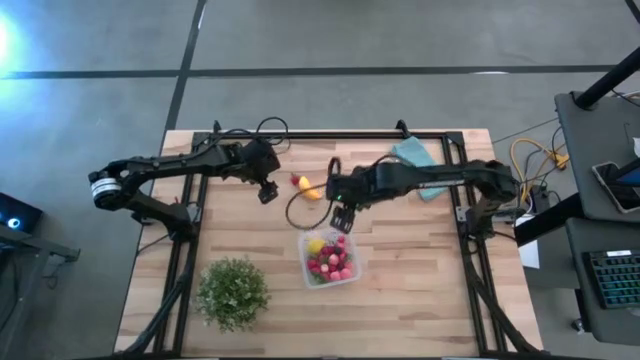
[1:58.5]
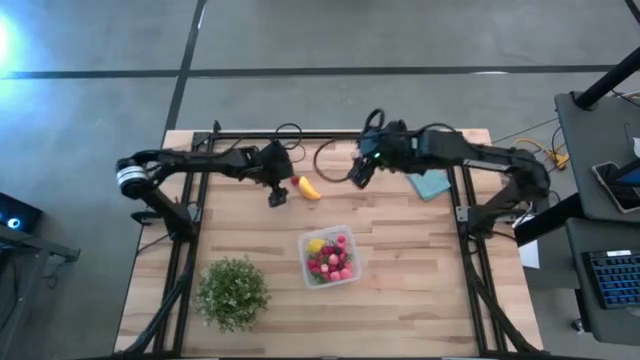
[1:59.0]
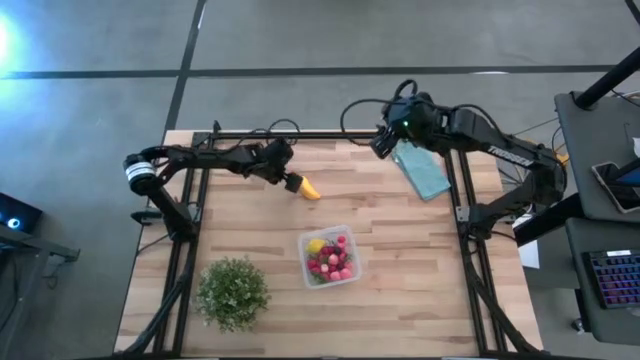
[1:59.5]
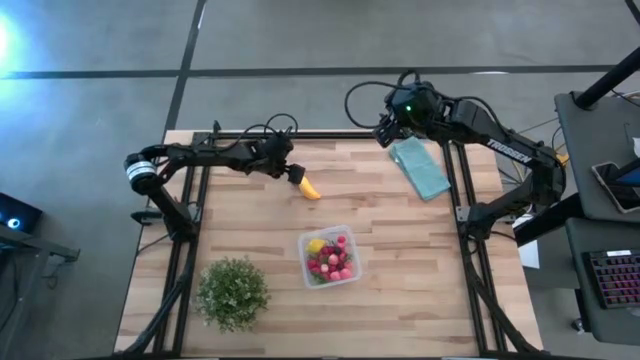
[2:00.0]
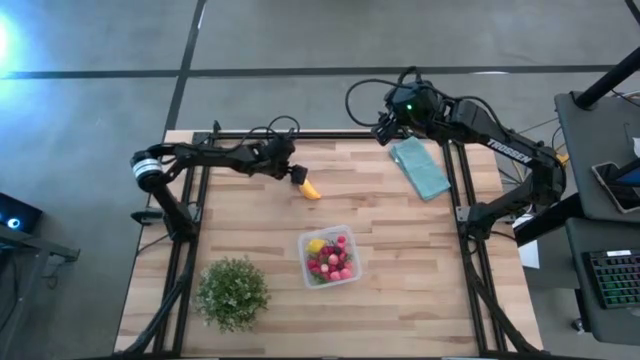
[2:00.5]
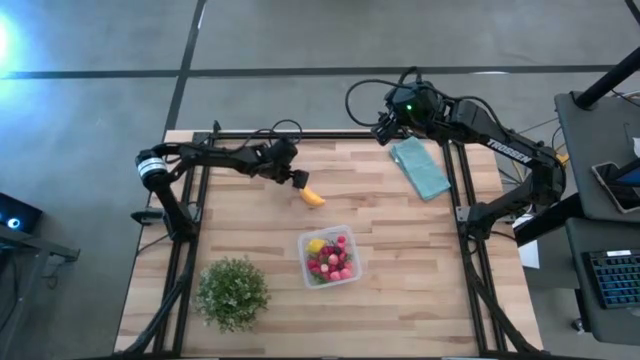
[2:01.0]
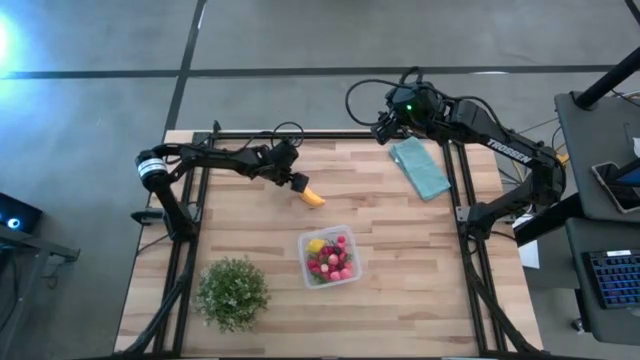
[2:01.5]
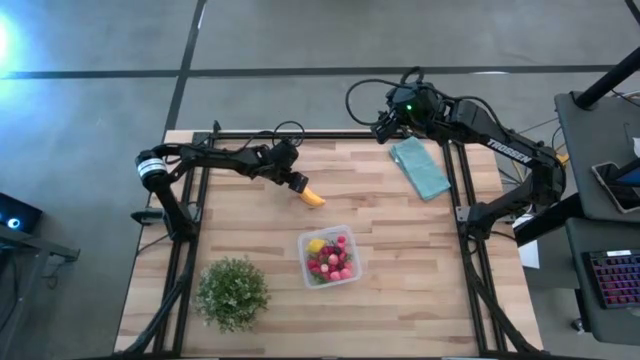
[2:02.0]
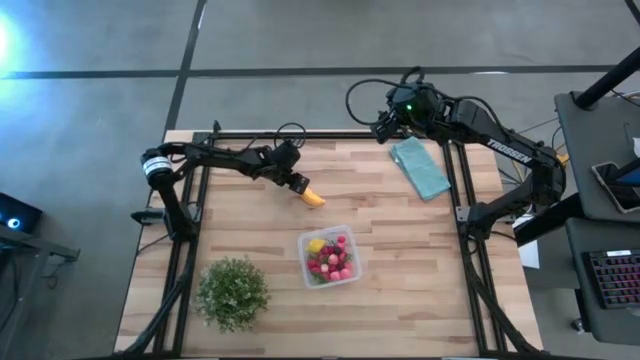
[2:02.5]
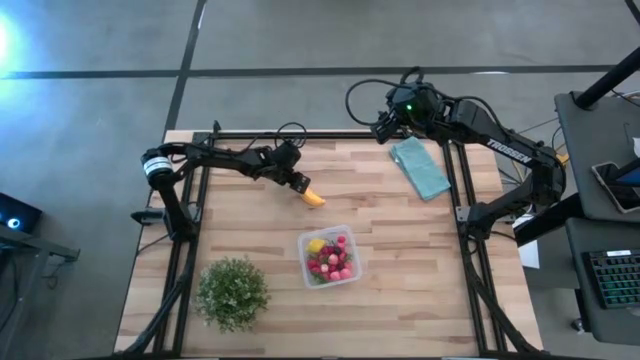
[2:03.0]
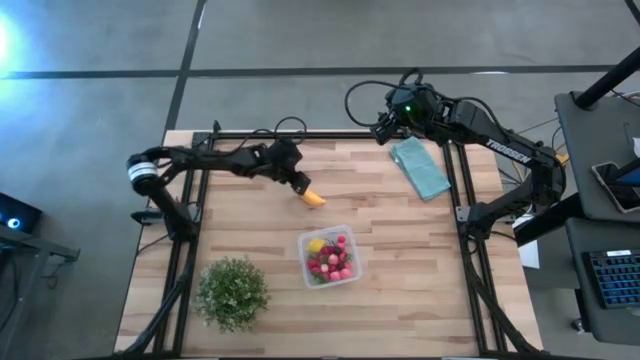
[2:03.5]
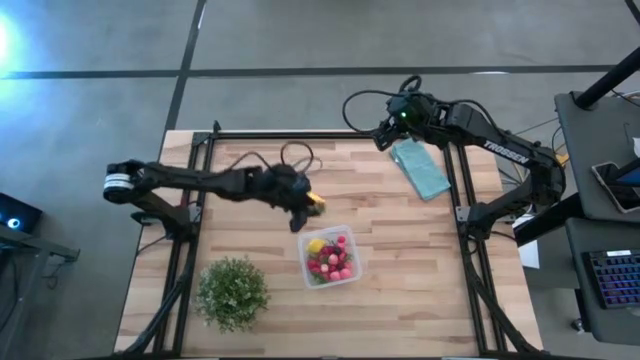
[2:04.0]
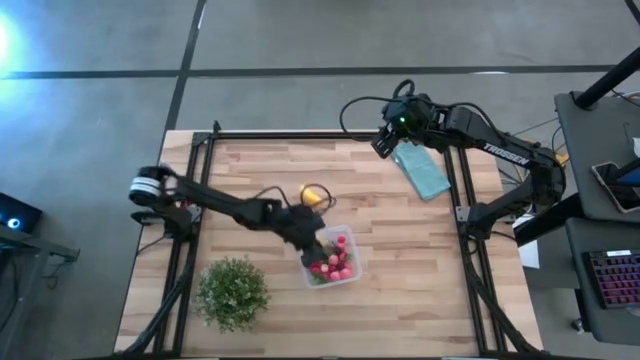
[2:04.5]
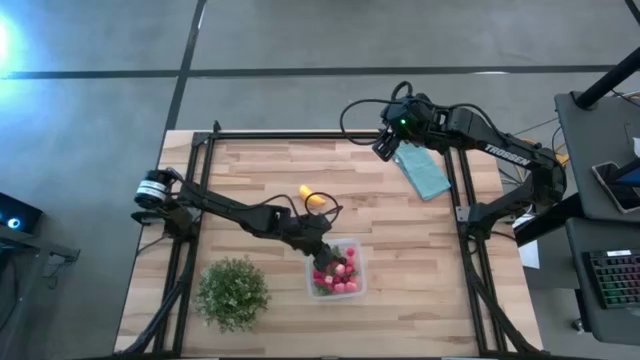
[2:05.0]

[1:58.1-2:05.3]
Task: Pick and placing Produce into tupperware
Put the strawberry into the transparent bin

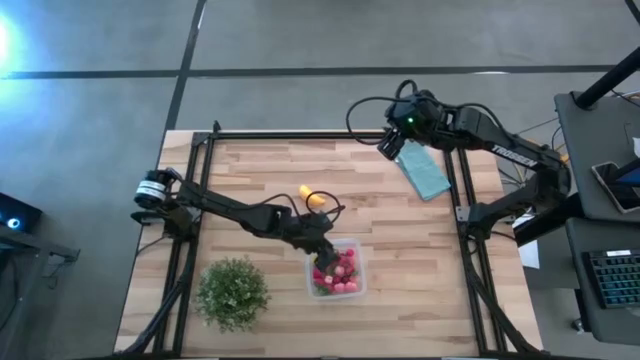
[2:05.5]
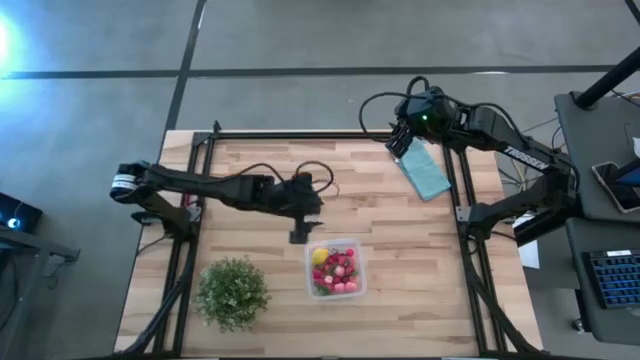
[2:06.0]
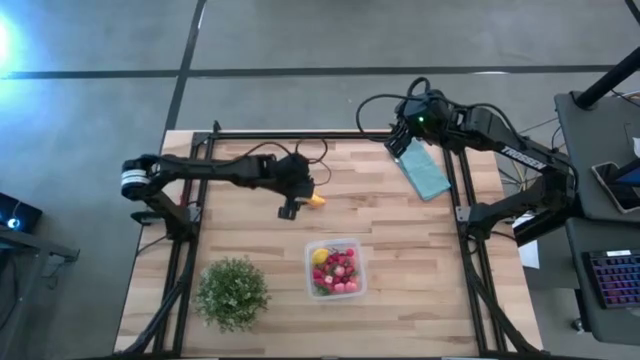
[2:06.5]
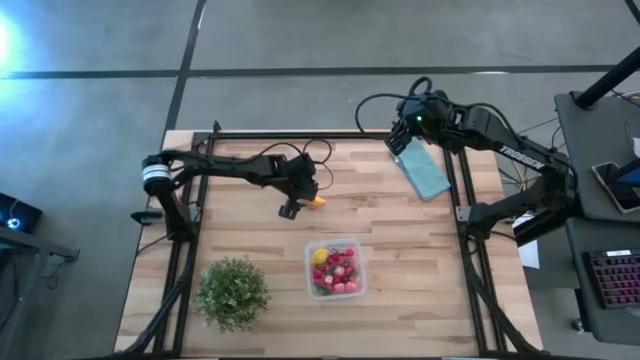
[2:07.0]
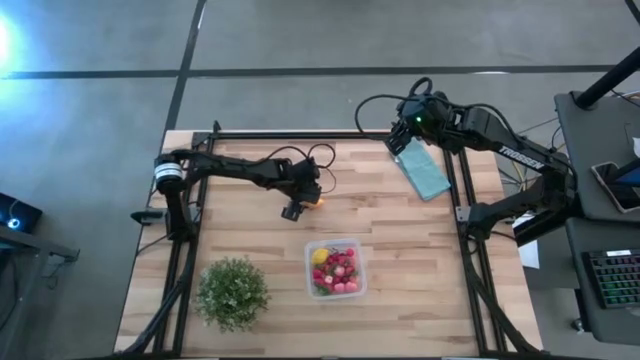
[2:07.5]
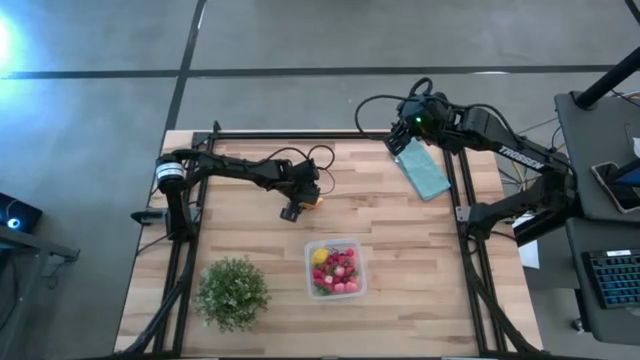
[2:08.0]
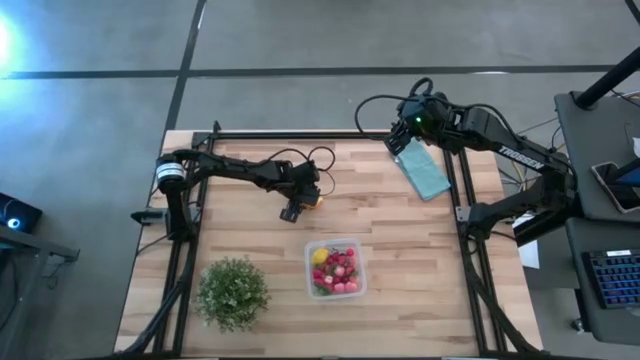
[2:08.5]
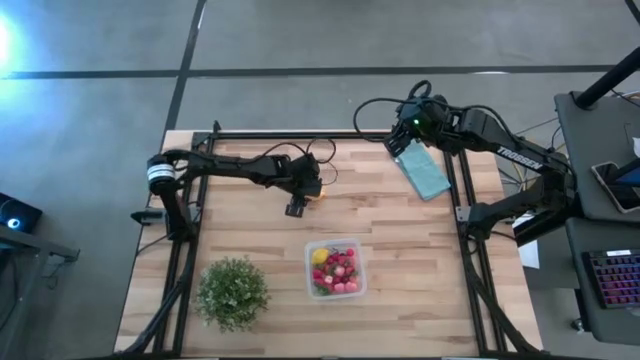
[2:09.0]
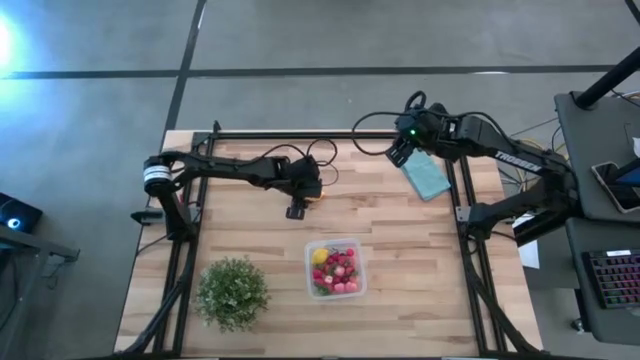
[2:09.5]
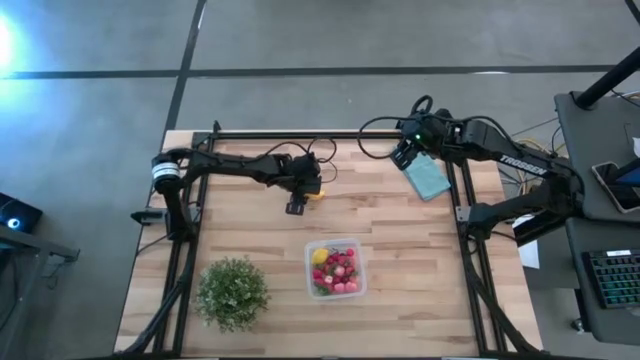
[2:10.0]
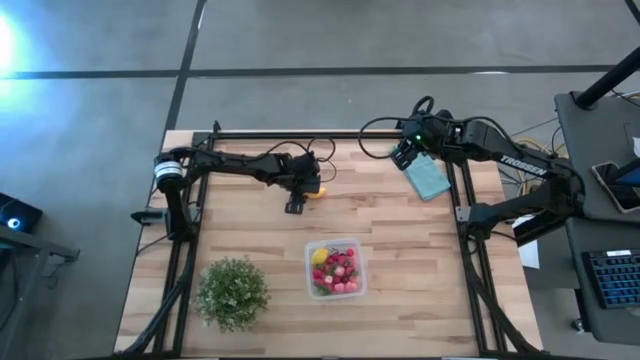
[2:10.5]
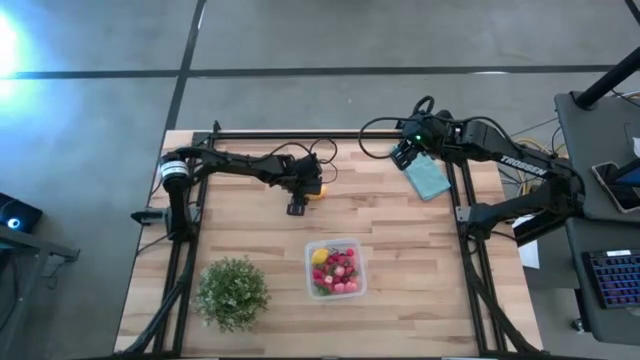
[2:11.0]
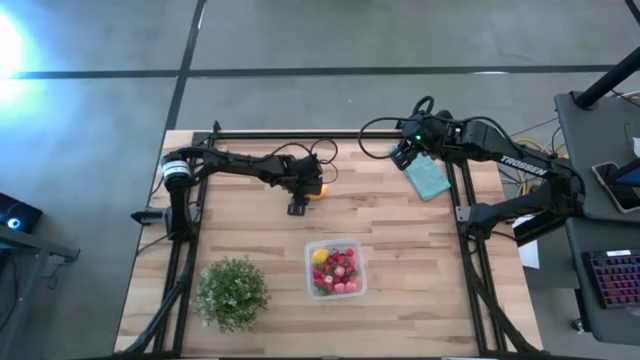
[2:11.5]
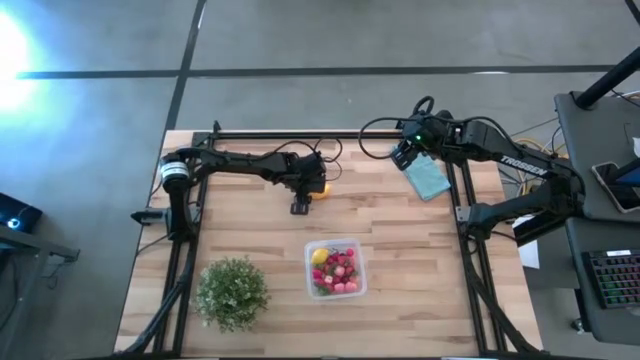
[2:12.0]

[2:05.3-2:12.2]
Put the banana into the transparent bin

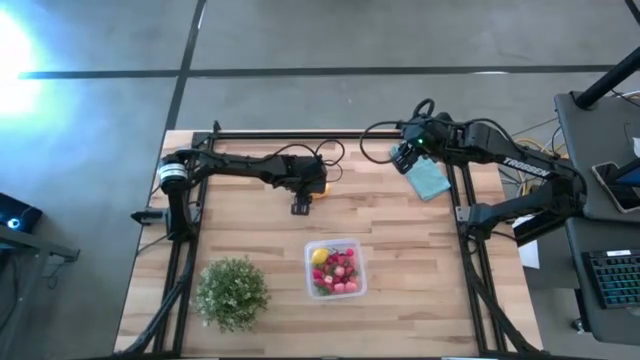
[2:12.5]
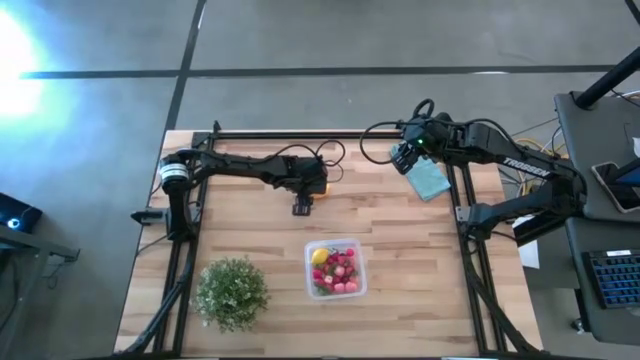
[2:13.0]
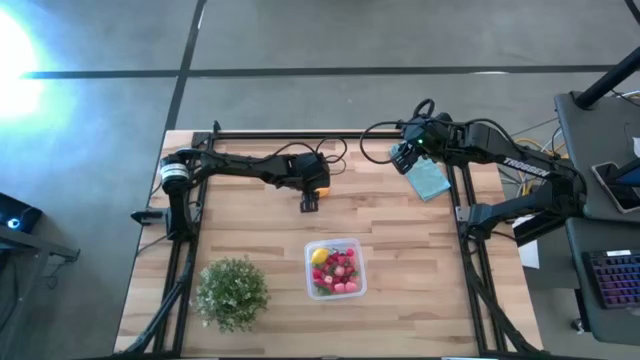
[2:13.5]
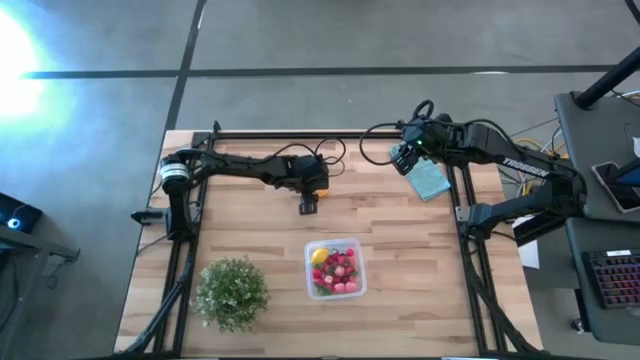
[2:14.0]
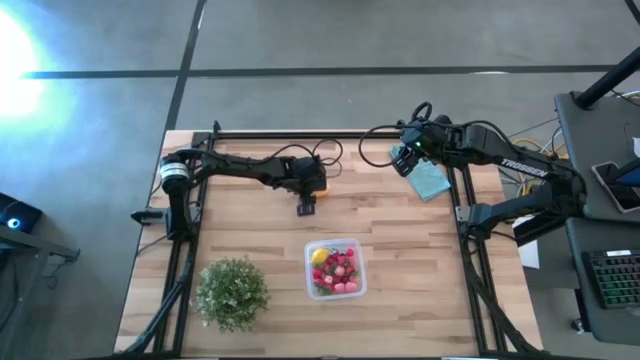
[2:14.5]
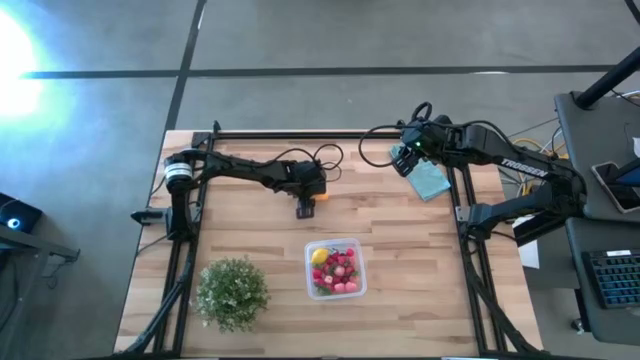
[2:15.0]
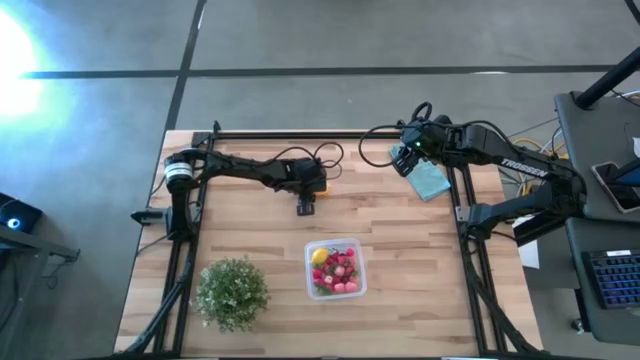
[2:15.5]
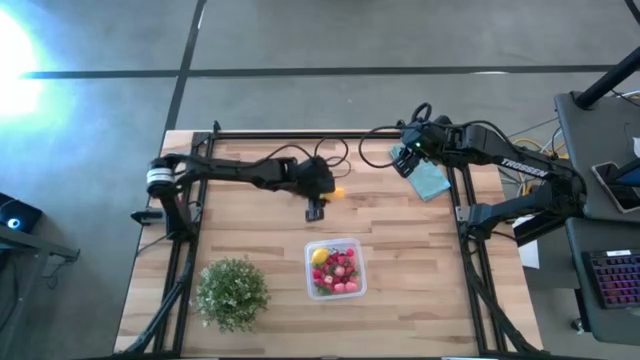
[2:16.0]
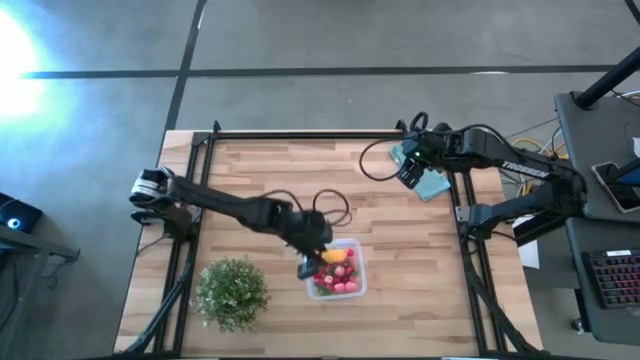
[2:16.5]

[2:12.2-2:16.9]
Put the banana into the transparent bin

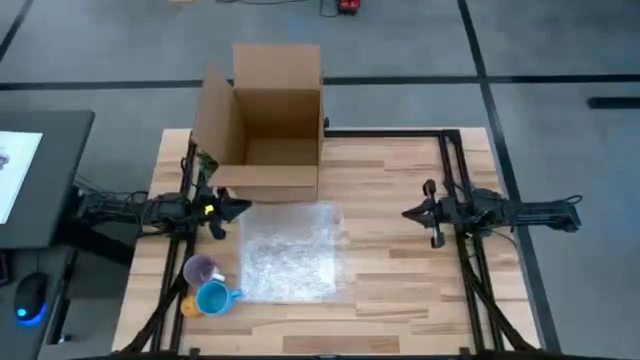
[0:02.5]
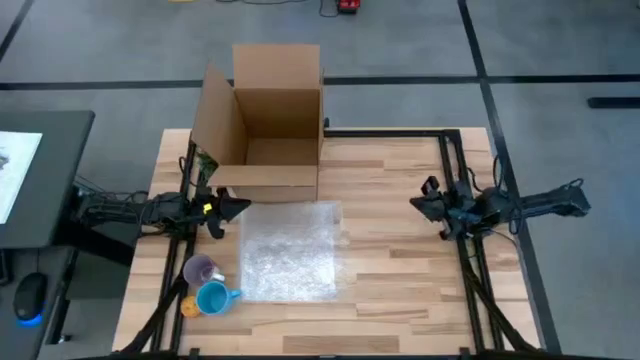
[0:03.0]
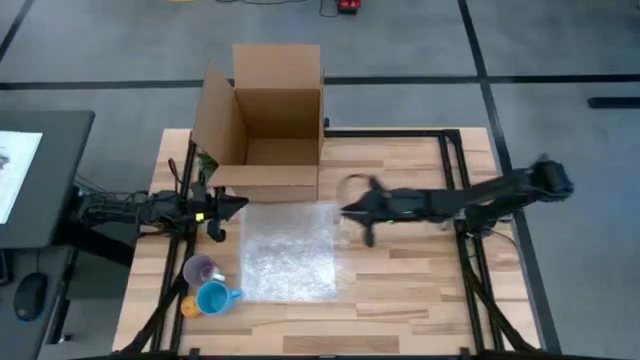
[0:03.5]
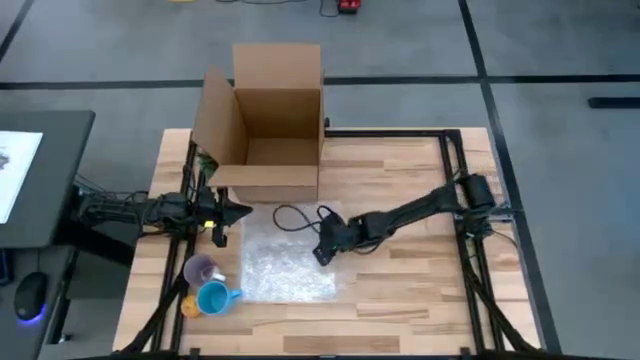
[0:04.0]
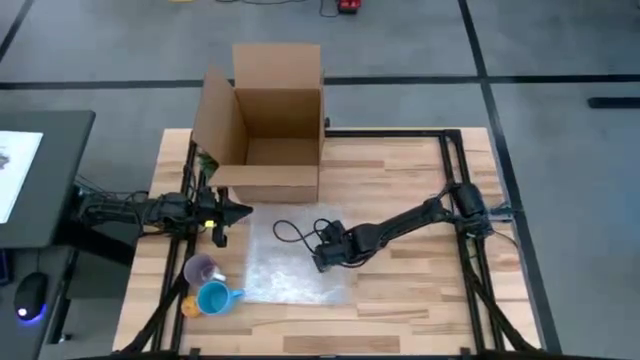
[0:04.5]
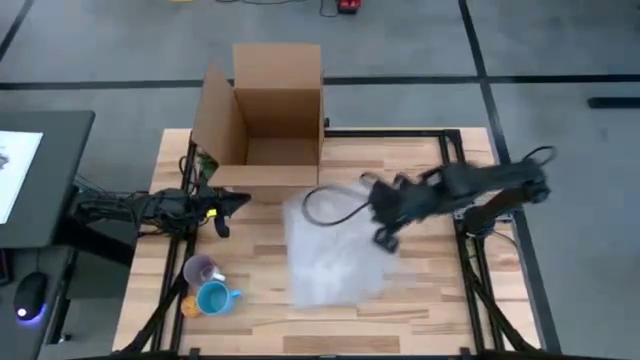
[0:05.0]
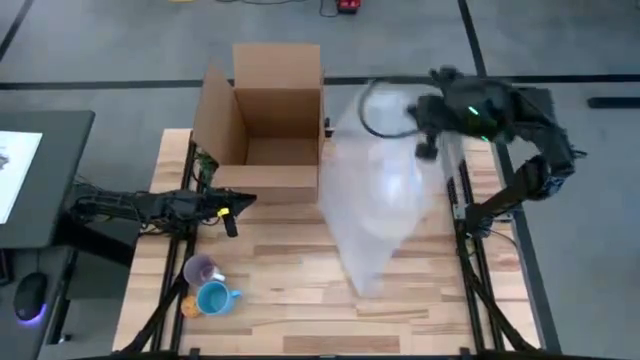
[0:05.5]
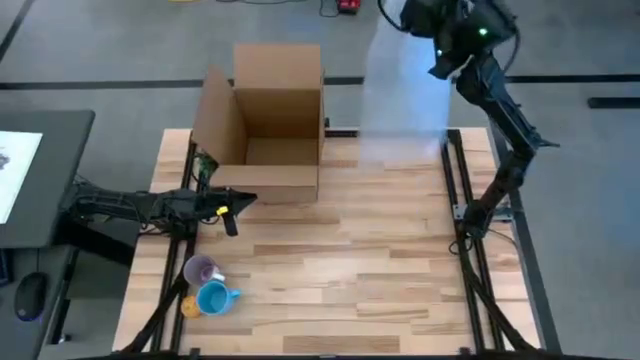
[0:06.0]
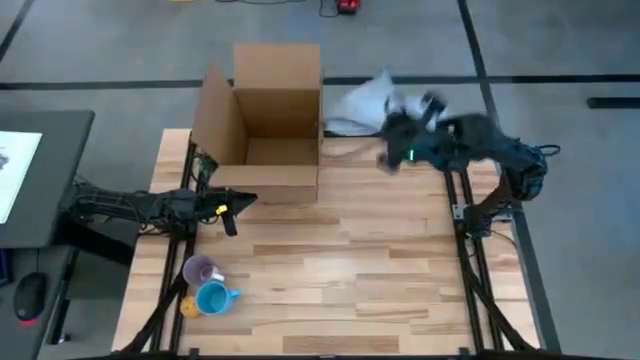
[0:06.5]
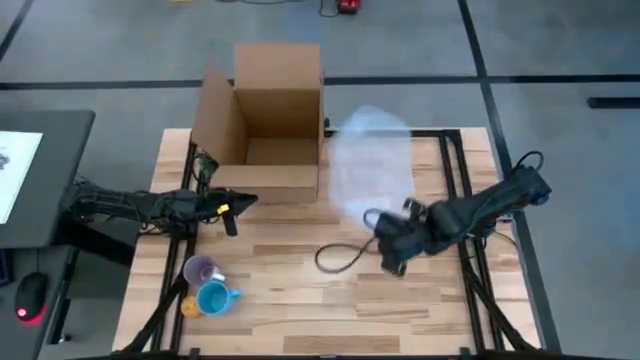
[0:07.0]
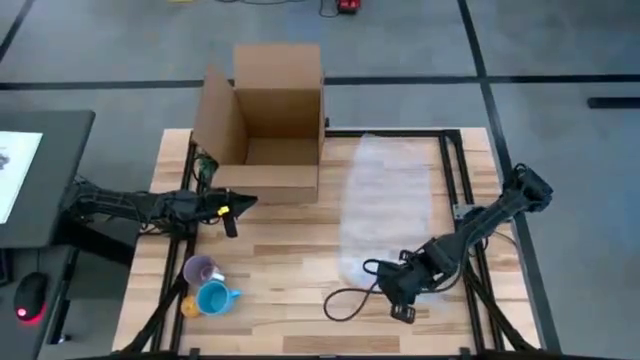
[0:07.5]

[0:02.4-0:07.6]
Task: wrap mug
Move the bubble wrap to the right
